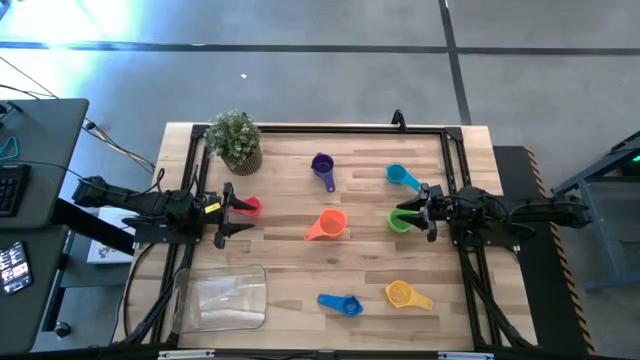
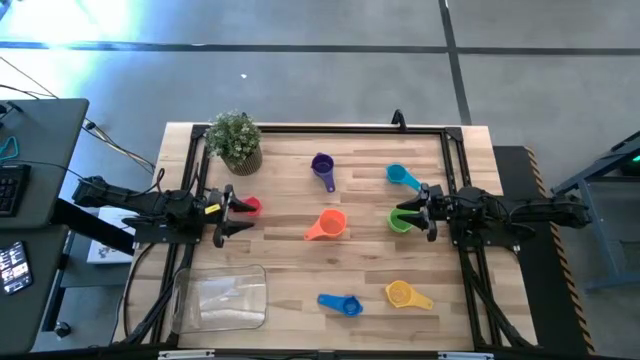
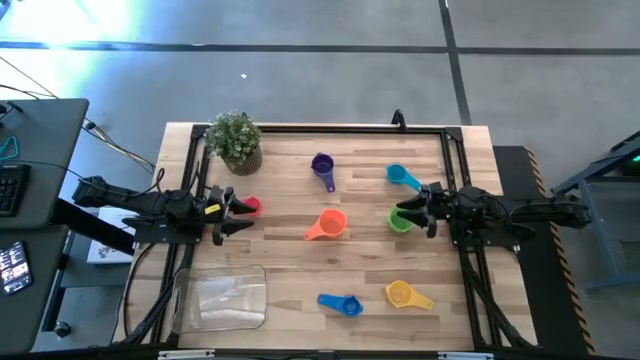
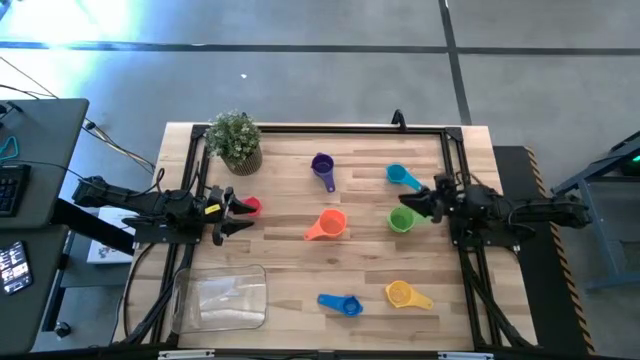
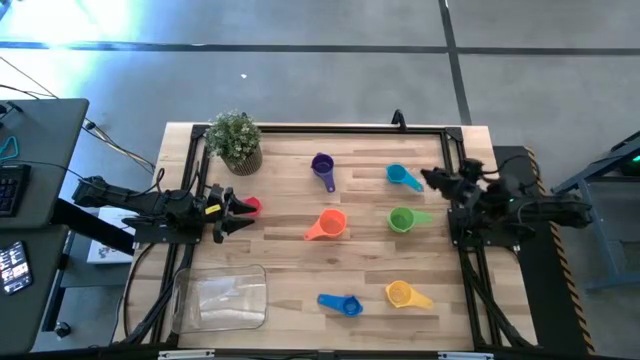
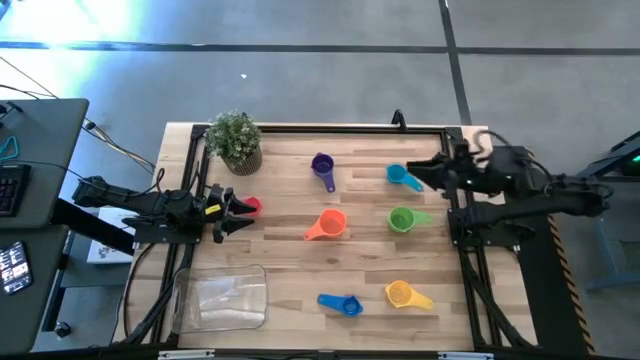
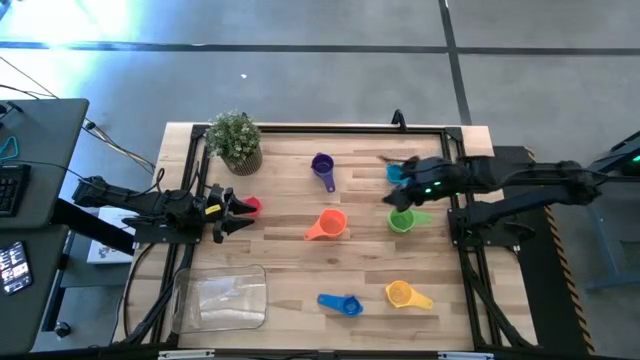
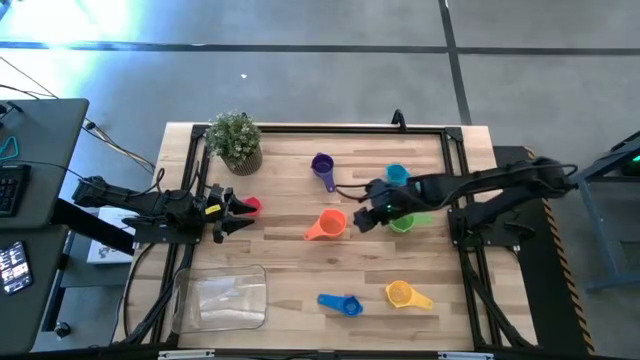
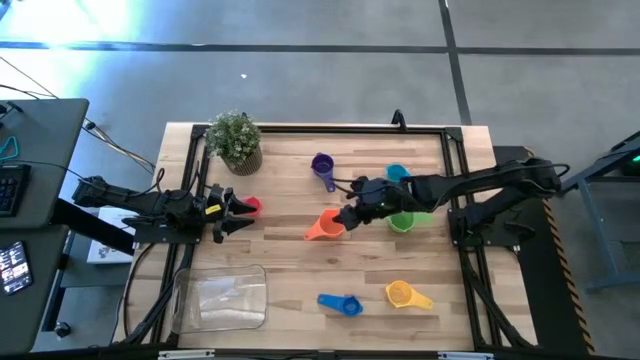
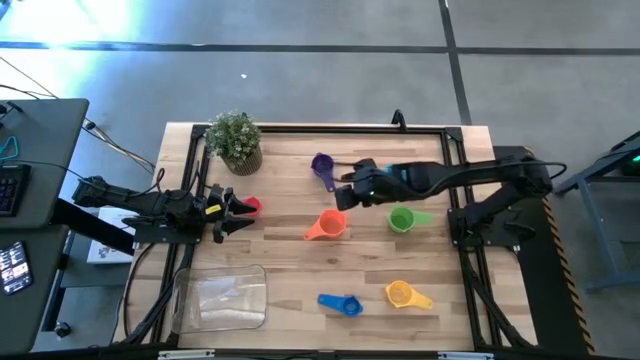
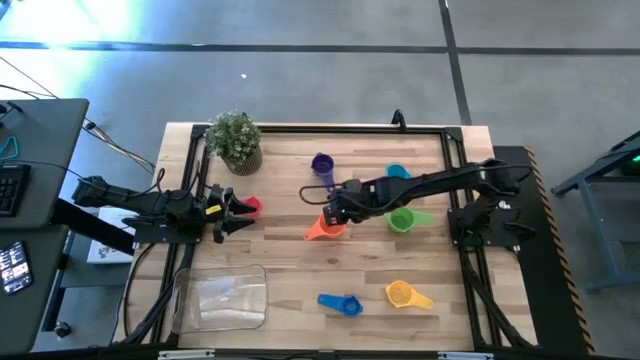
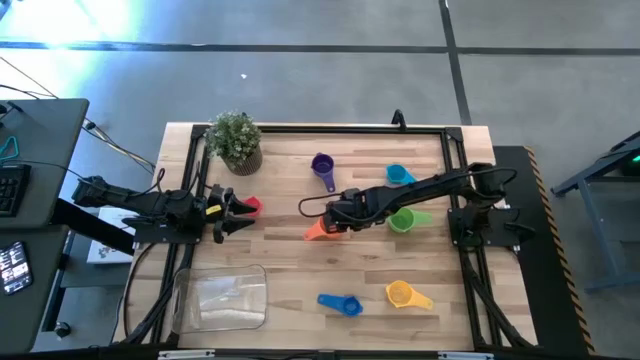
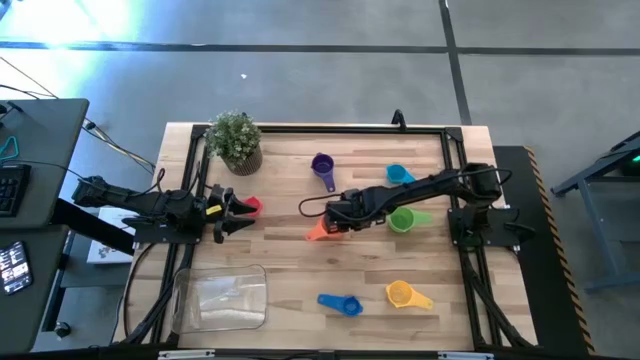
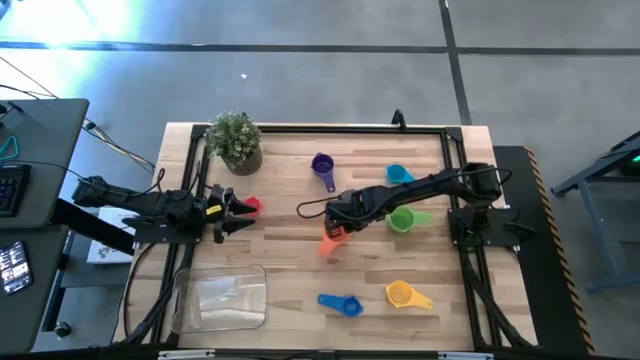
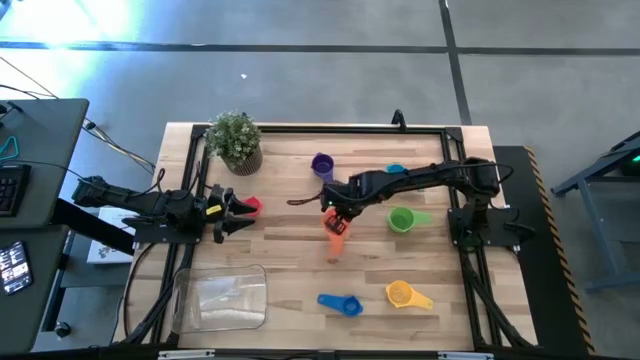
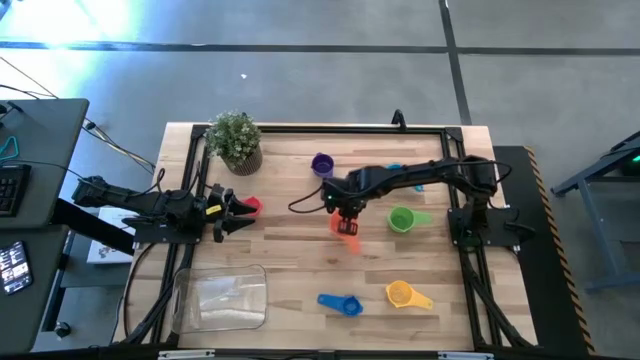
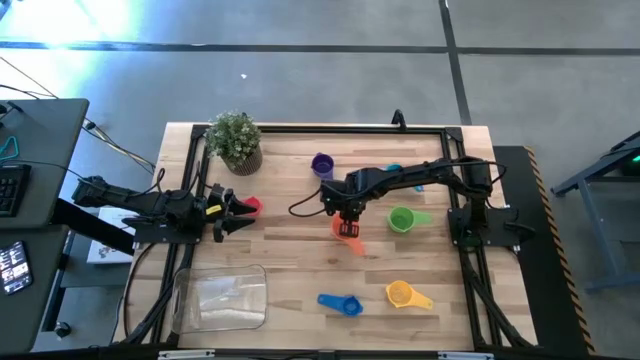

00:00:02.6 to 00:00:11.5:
Task: Nest measuring cups in basket
Prepare the orange measuring cup

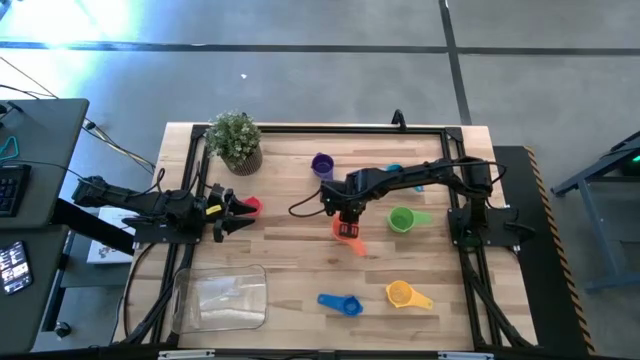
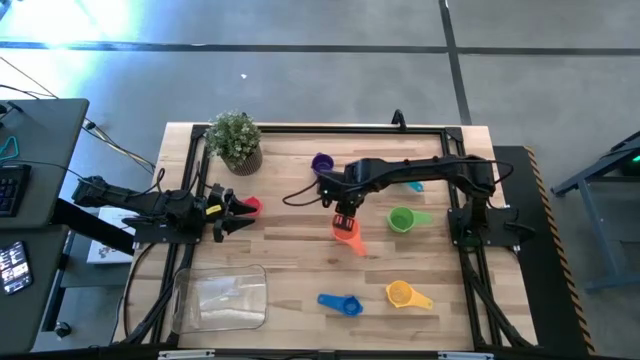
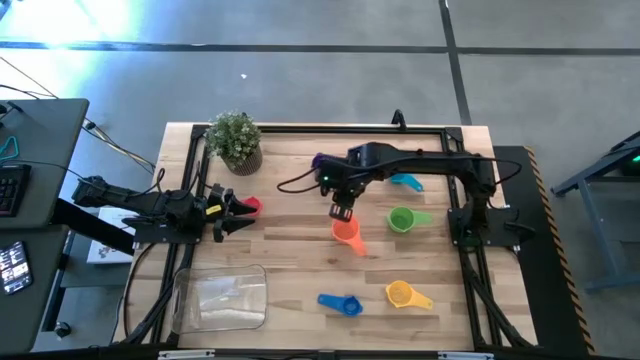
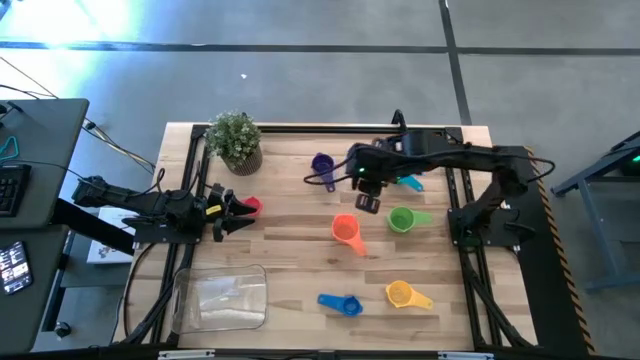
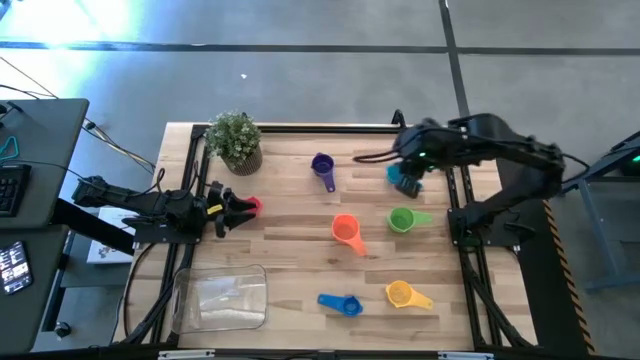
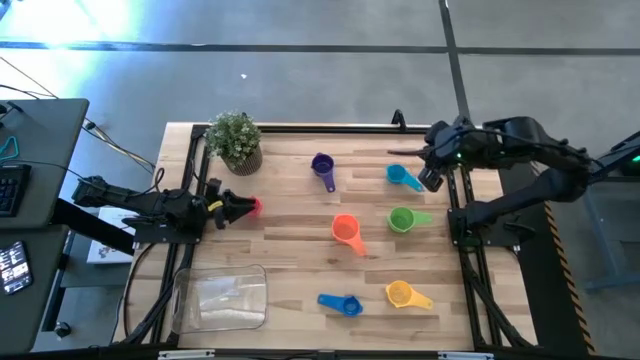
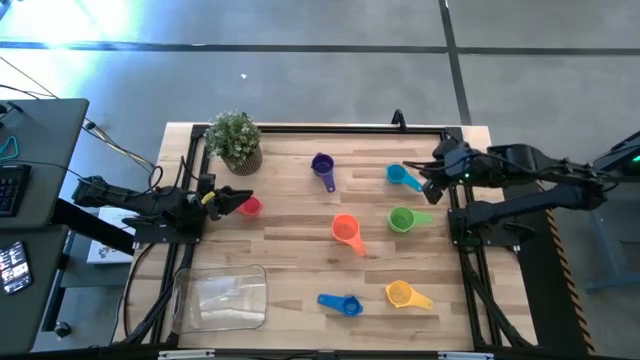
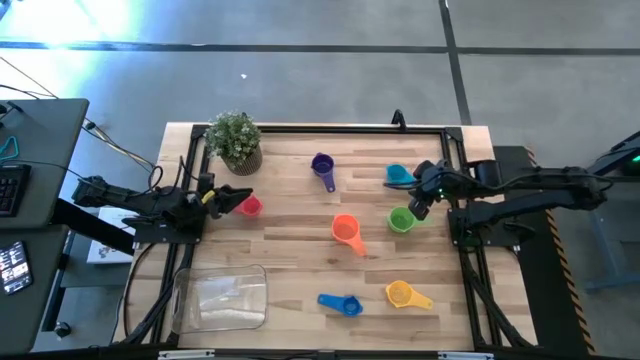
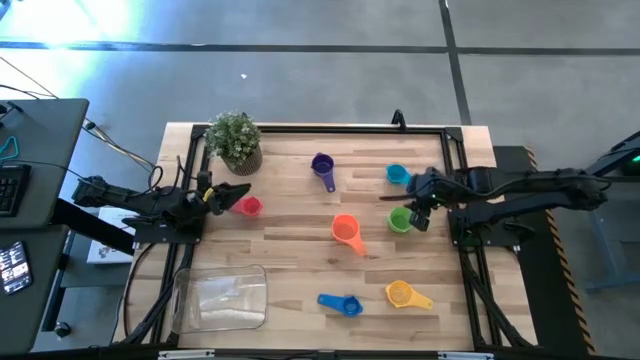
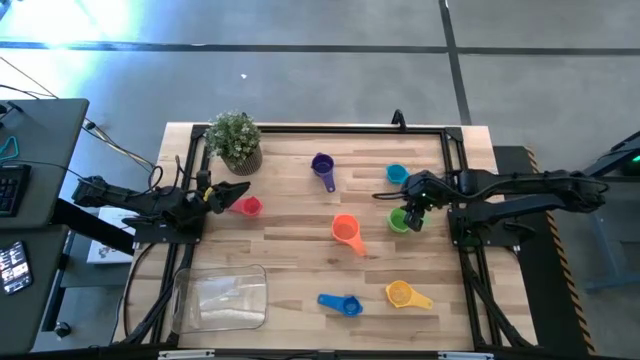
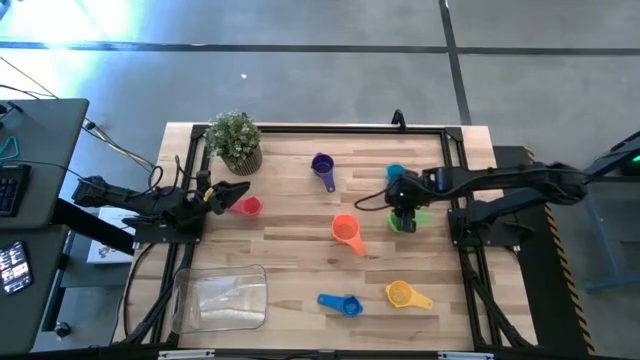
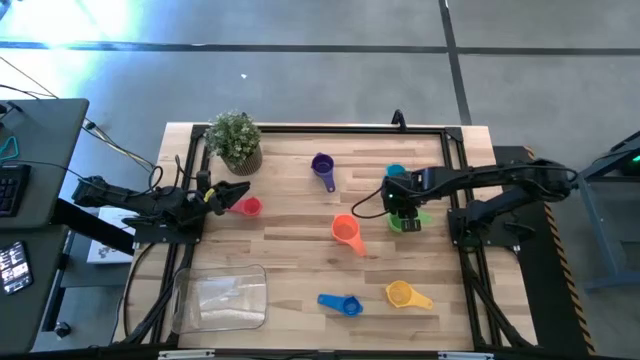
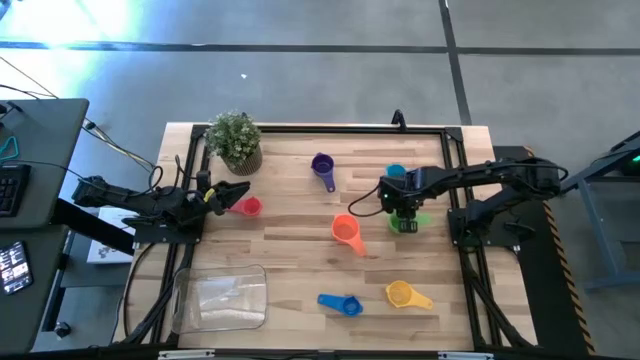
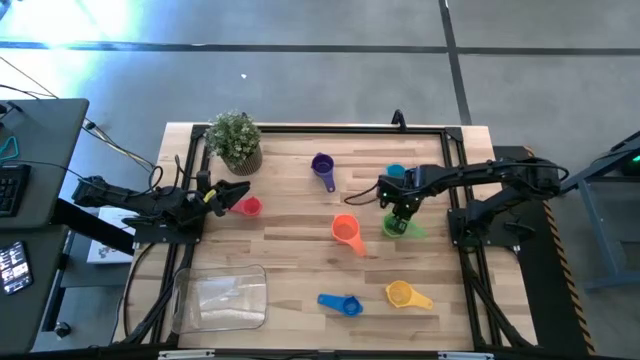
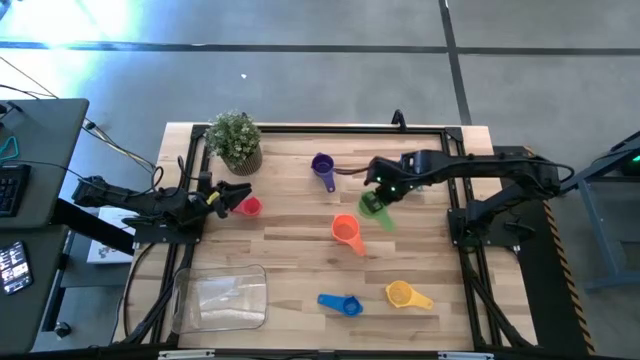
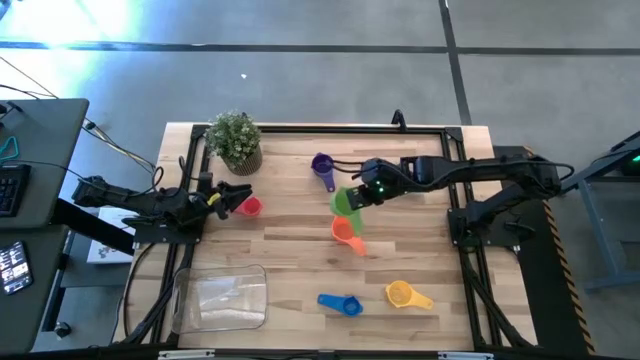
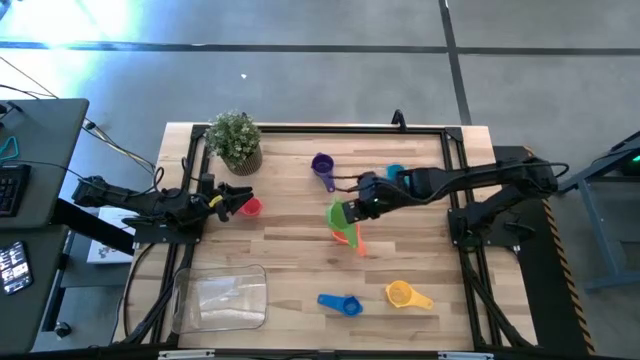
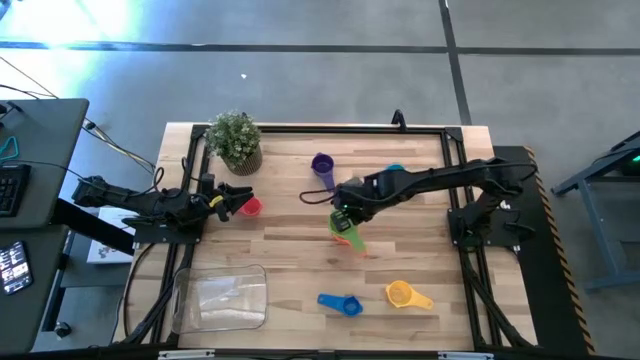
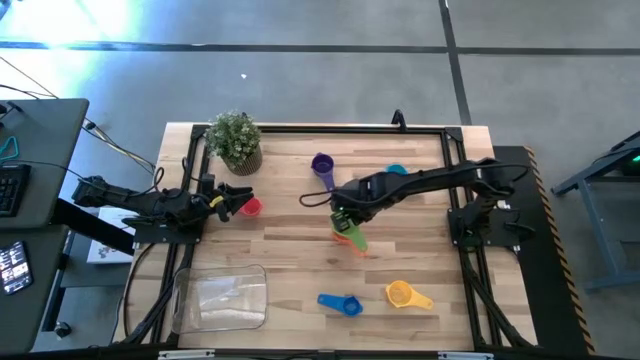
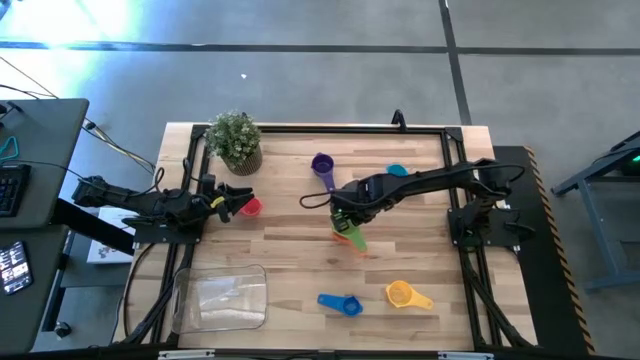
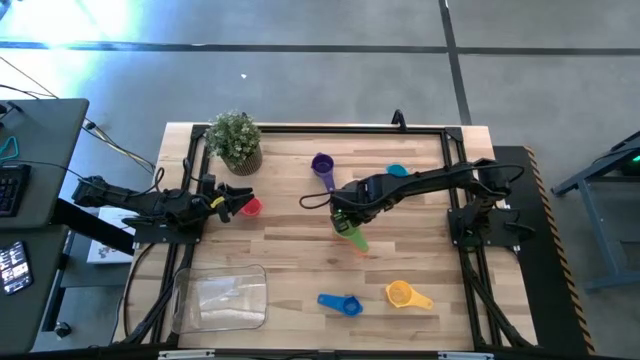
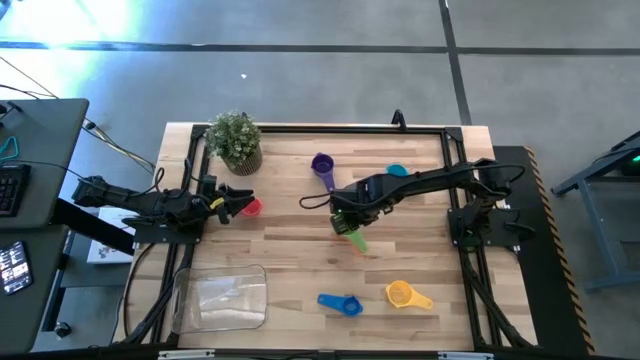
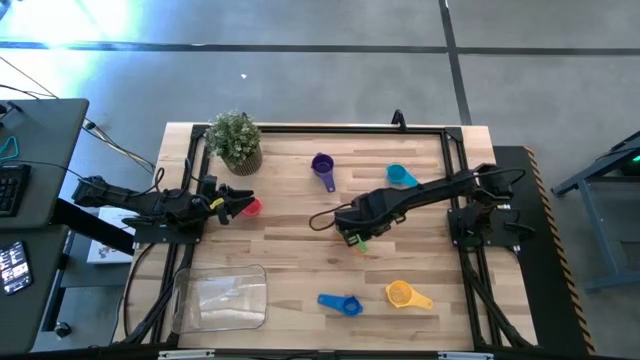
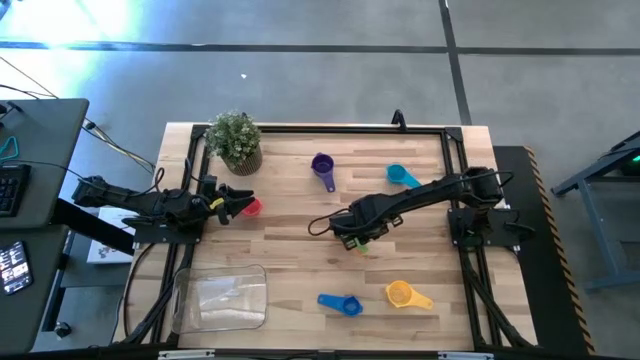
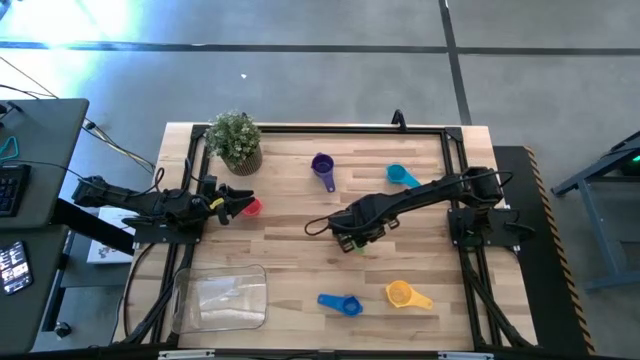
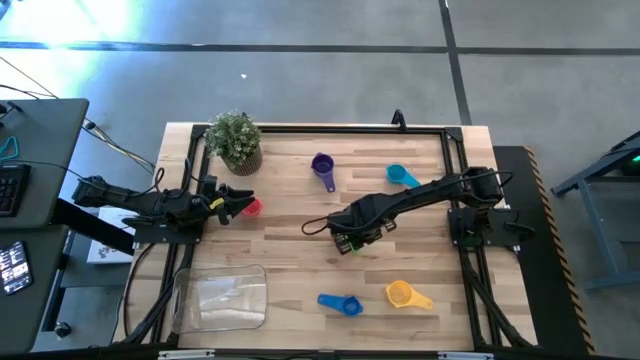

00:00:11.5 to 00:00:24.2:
Stack the green measuring cup on top of the orange measuring cup
